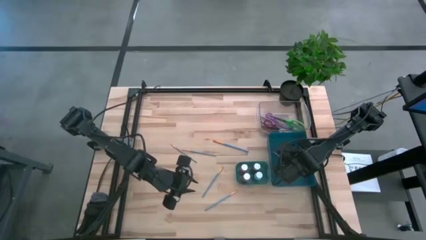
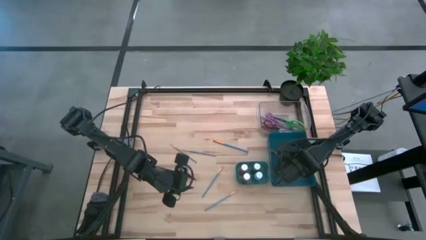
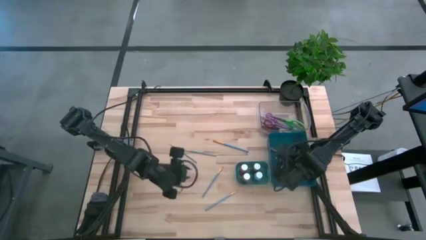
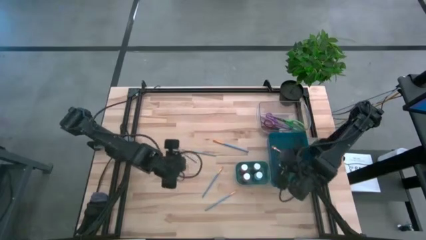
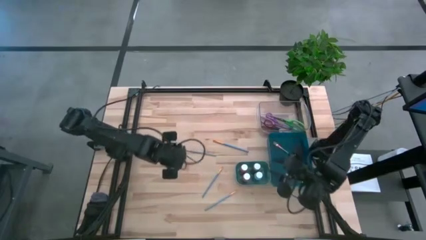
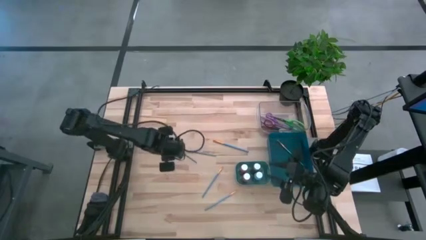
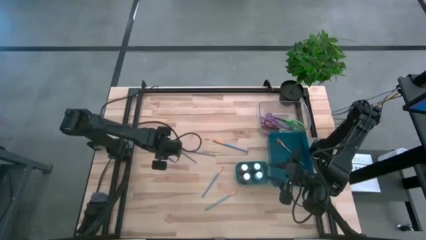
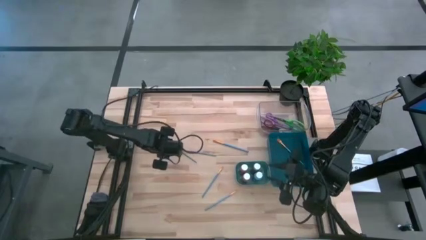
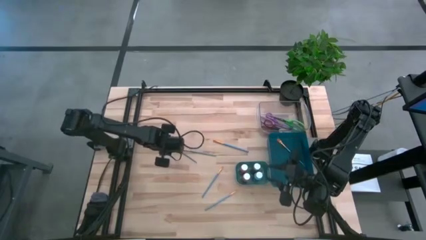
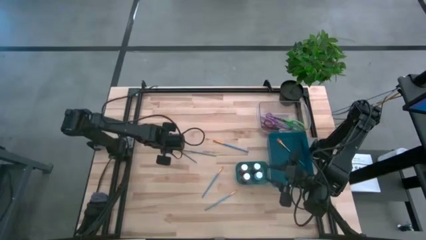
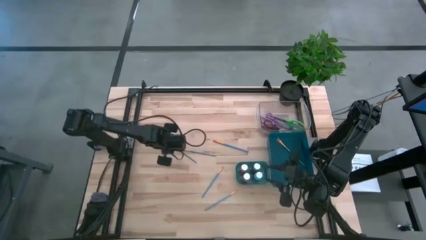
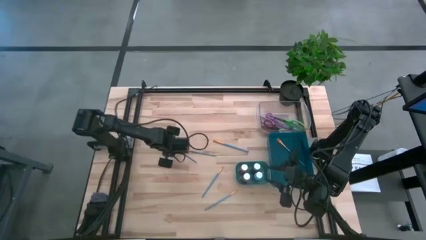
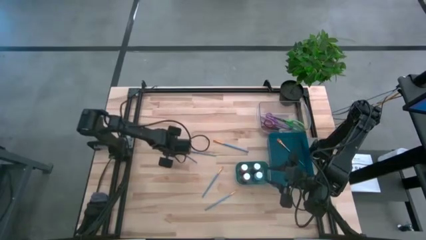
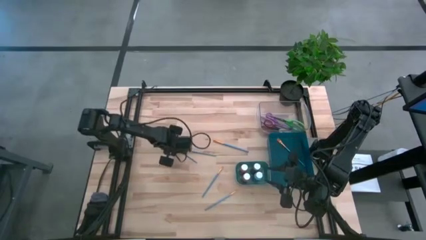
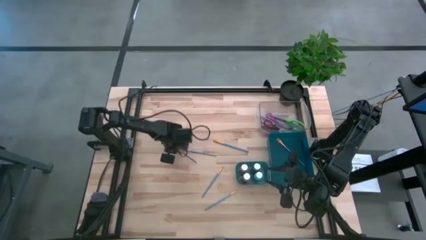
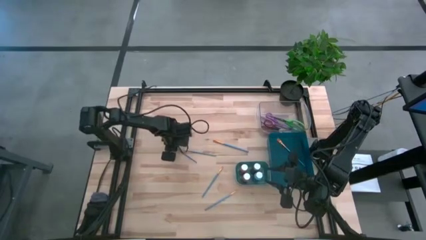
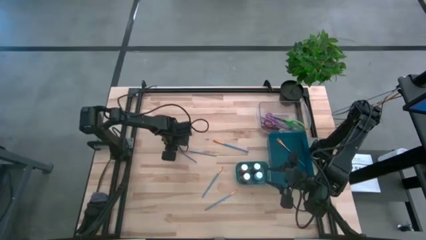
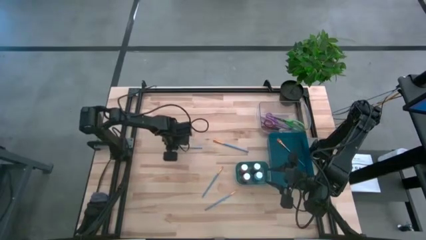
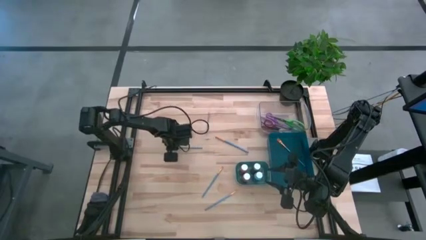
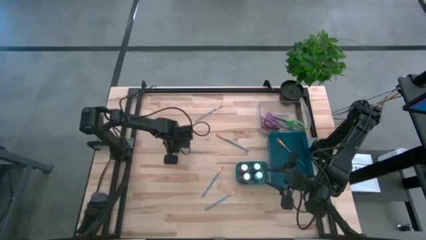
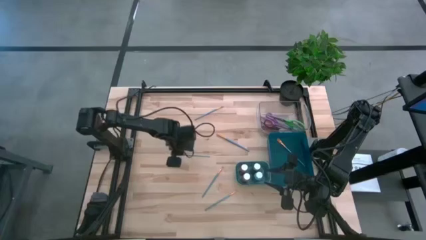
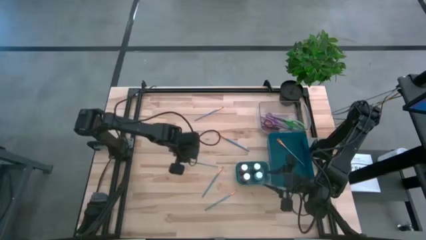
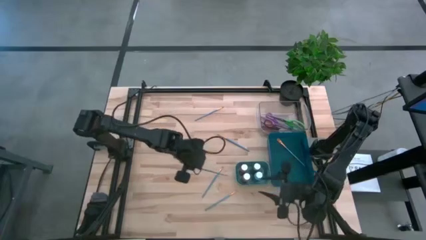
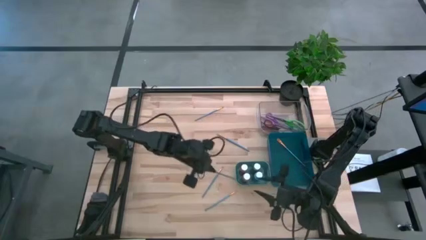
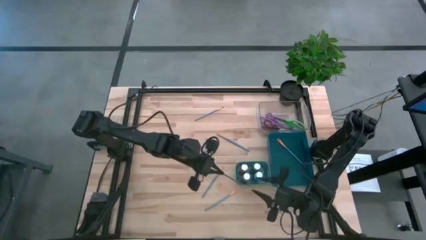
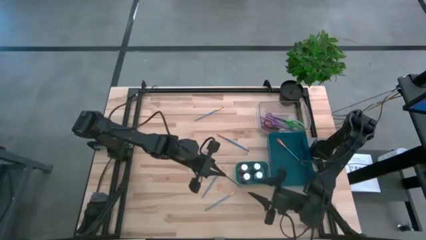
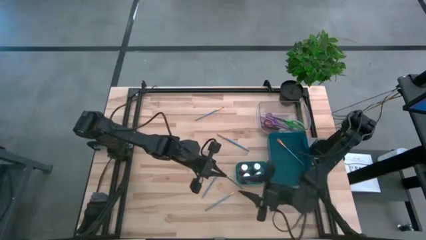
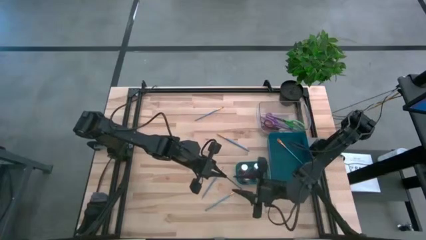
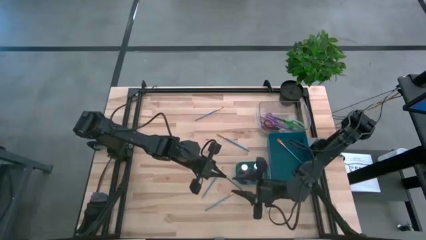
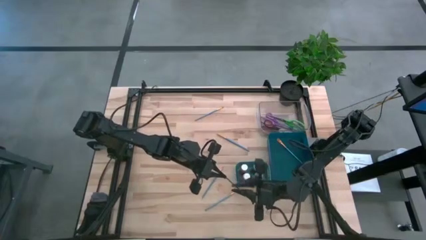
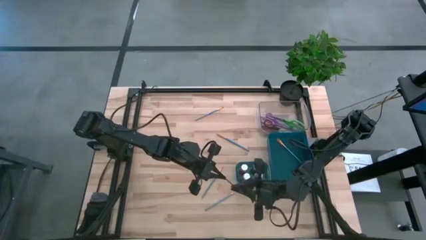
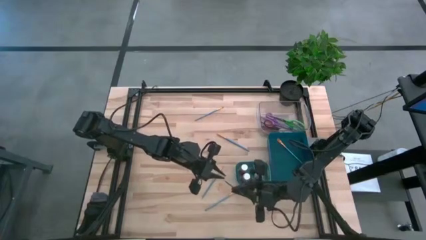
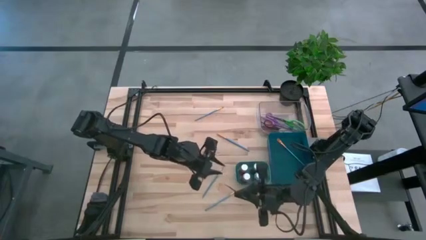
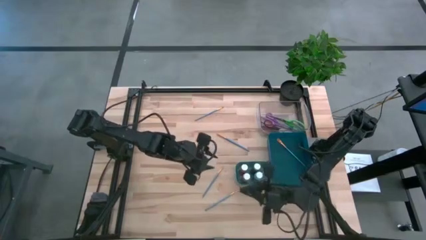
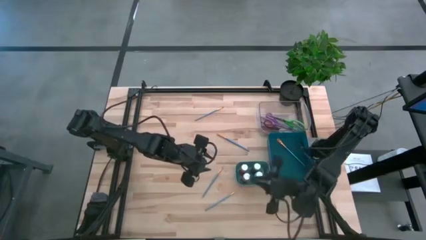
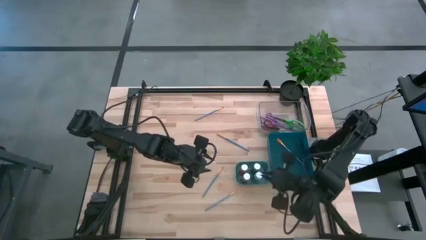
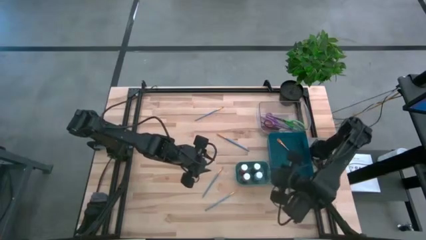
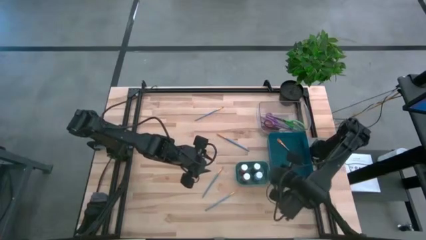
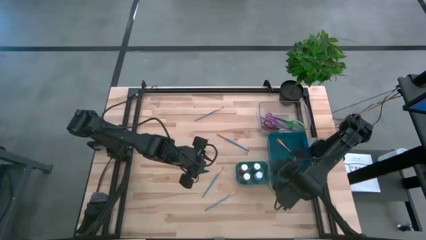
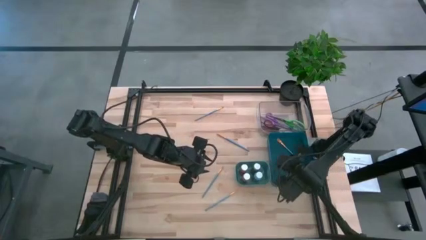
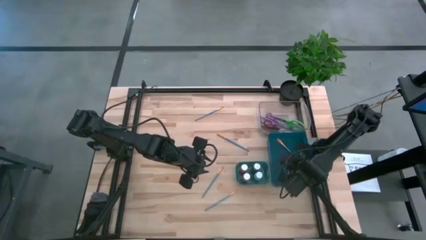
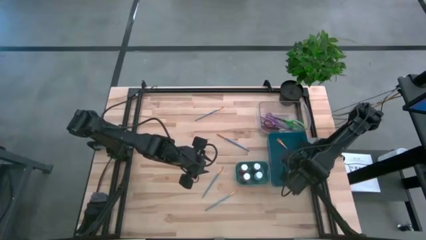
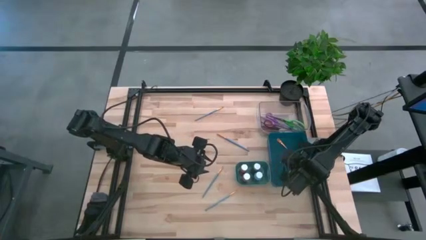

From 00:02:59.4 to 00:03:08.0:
Task: Pick & Place Paint Supplies
Put the blue paintbrush into the blue bin

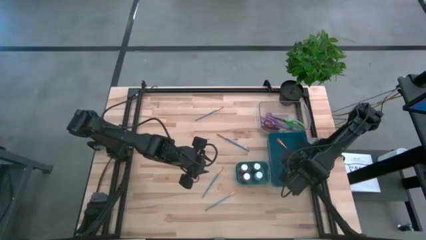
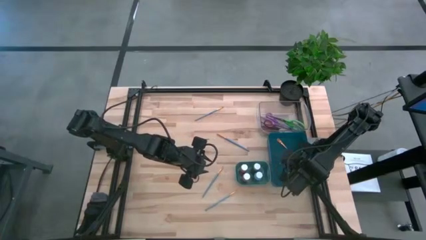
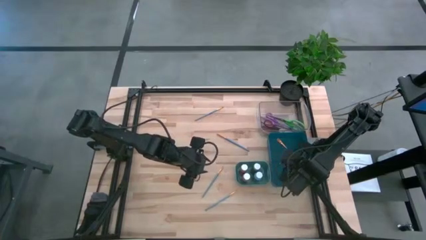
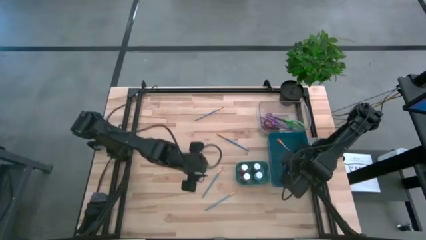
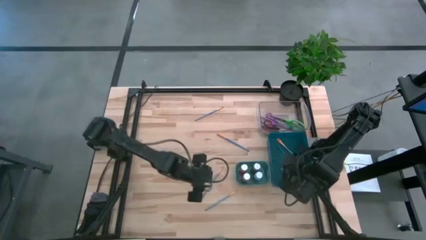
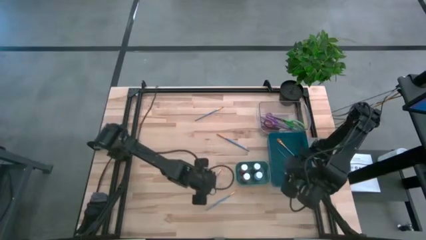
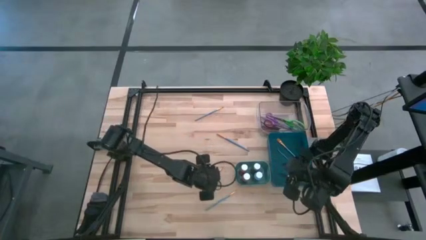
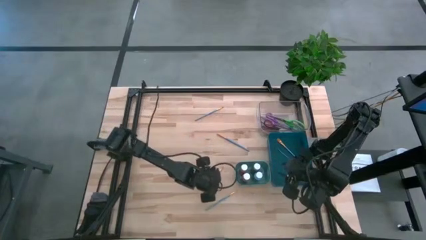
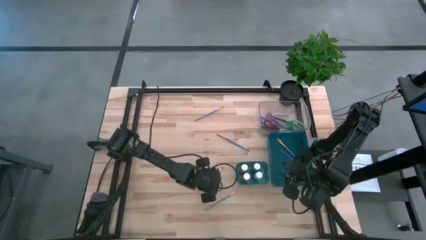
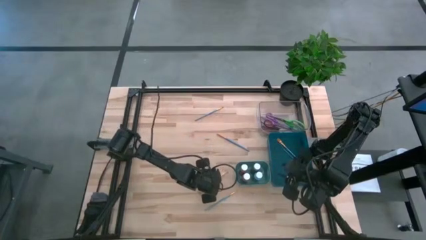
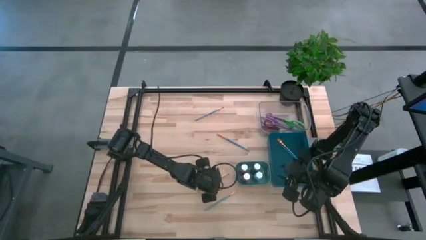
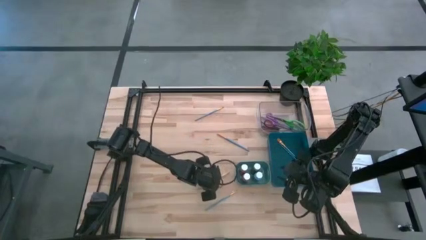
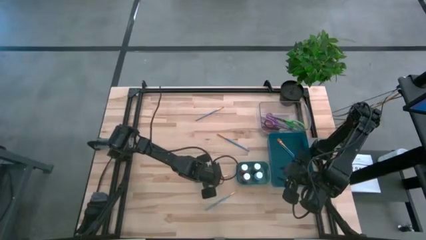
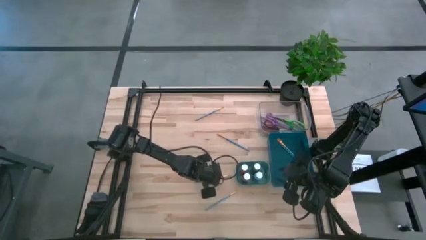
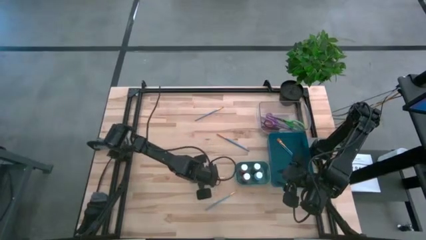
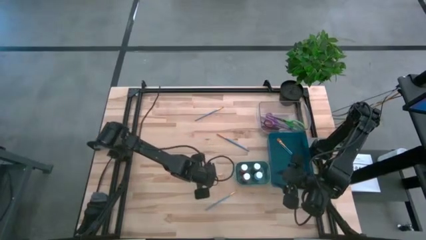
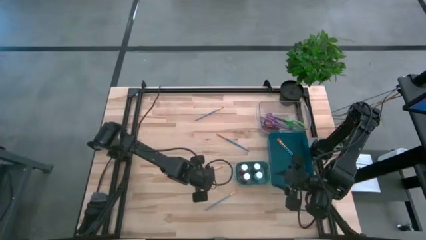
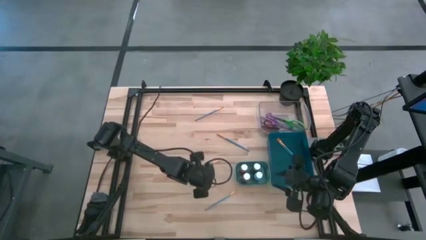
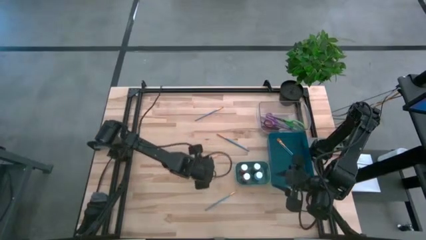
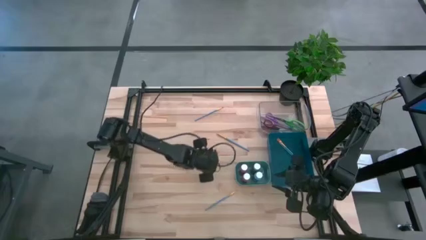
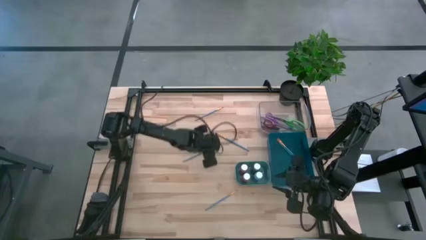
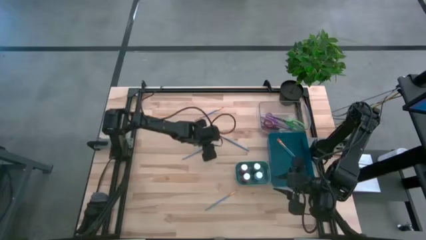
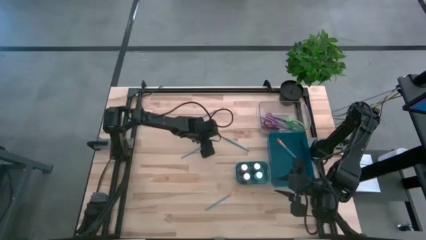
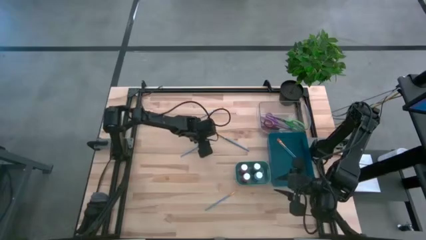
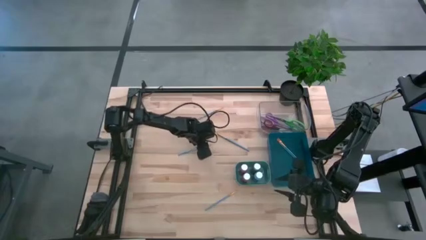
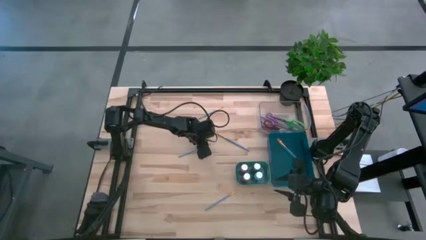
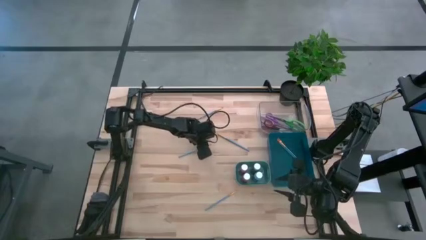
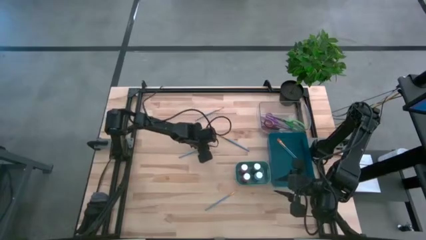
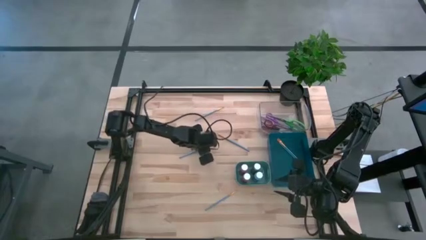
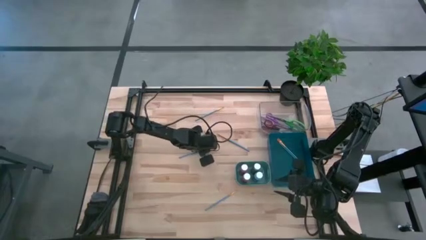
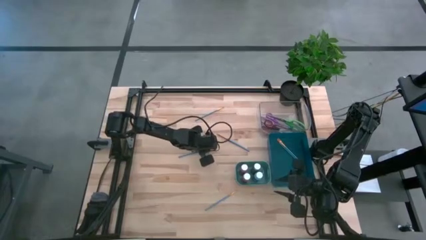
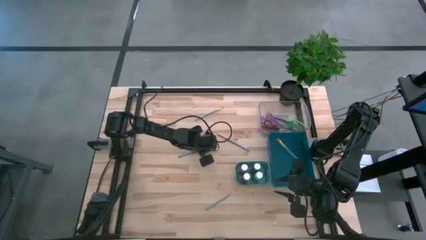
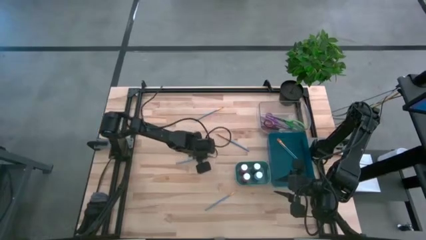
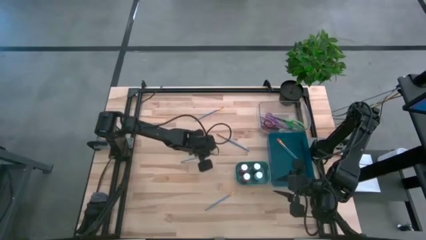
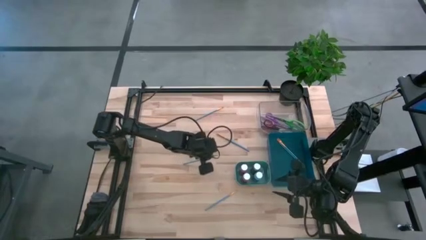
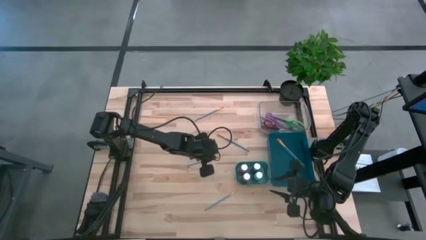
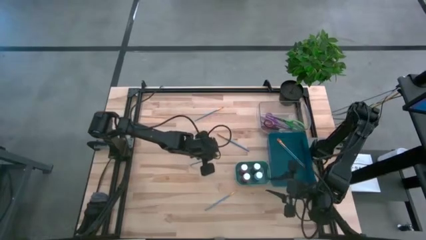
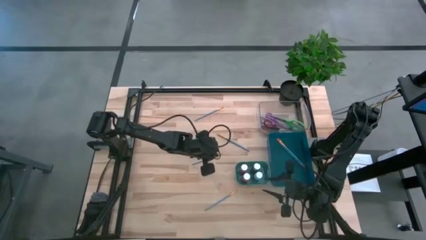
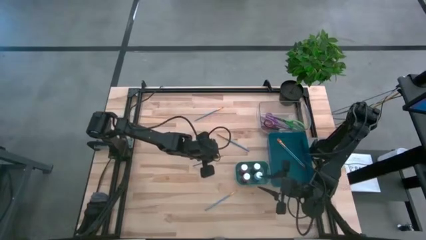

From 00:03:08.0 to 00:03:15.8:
Put the blue paintbrush into the blue bin

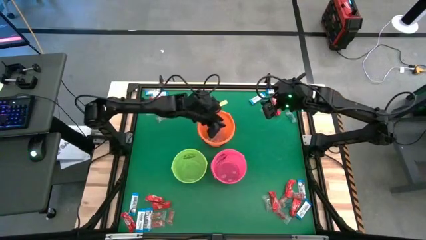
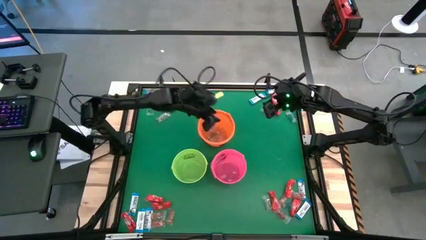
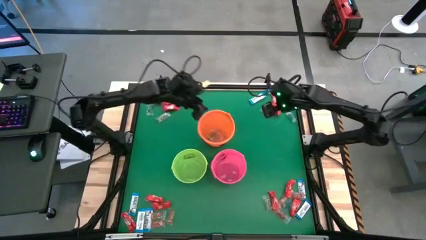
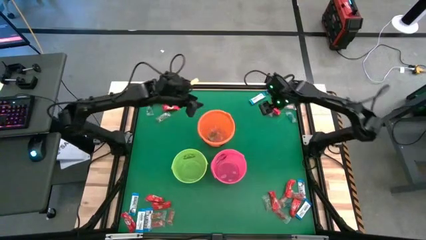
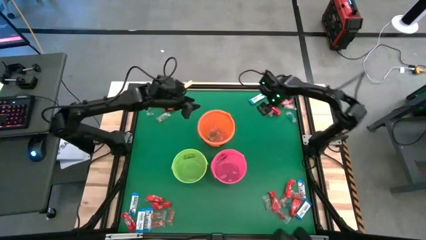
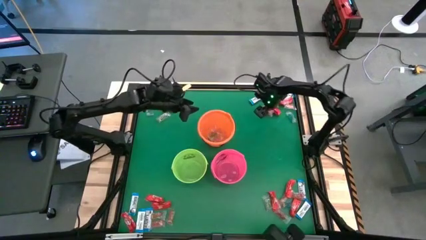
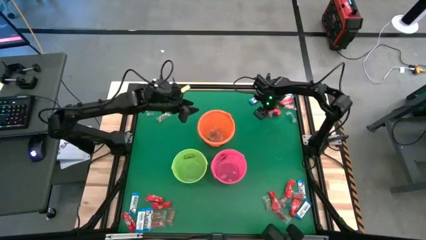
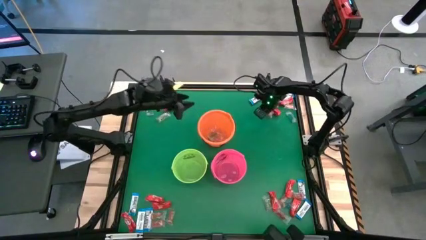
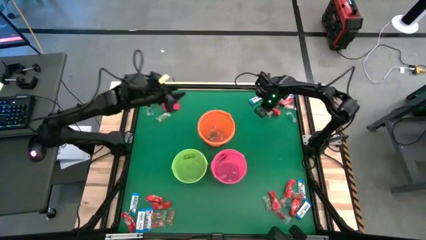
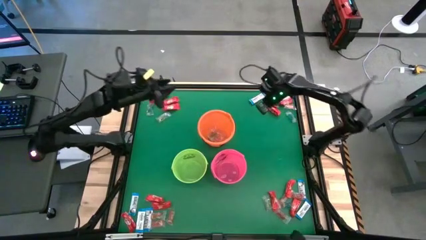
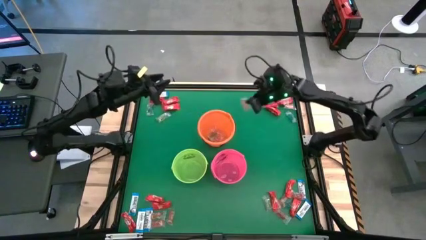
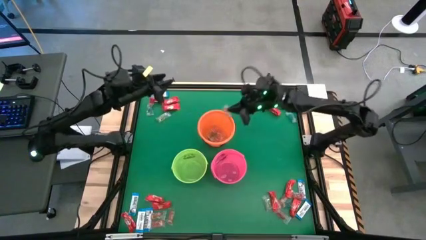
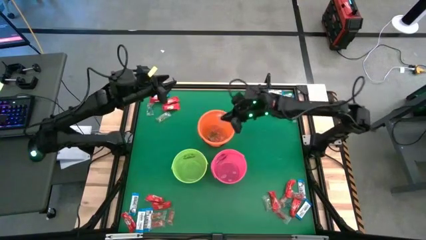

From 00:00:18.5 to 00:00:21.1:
Task: Sort candy by brand, put in halloween buckets
Put the orange gummy into the orange bucket
